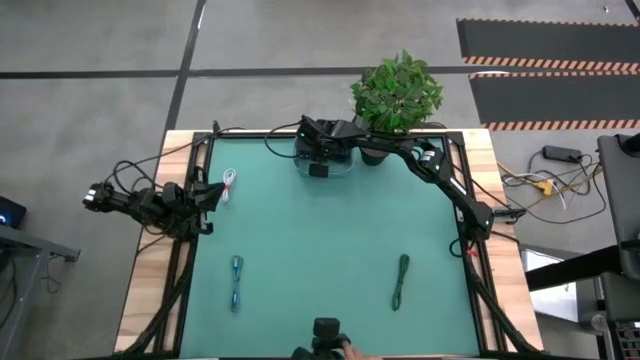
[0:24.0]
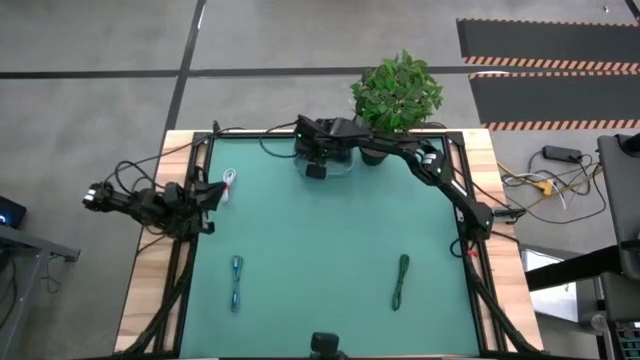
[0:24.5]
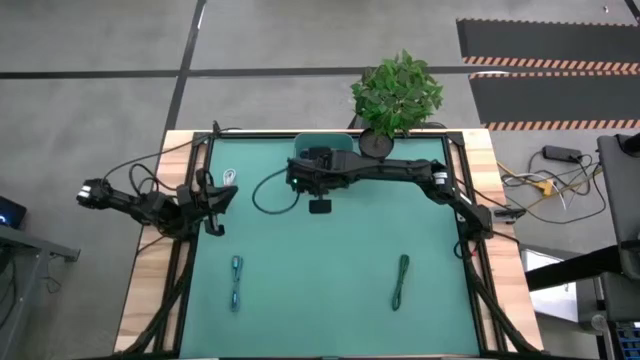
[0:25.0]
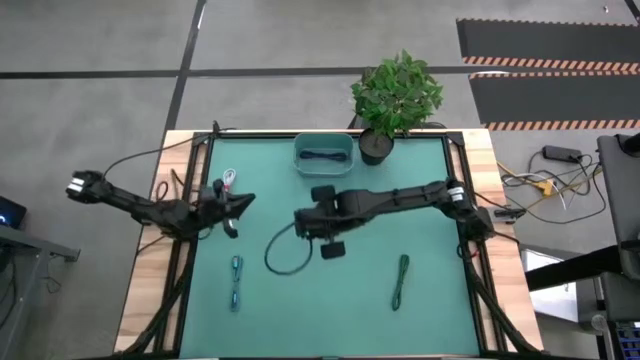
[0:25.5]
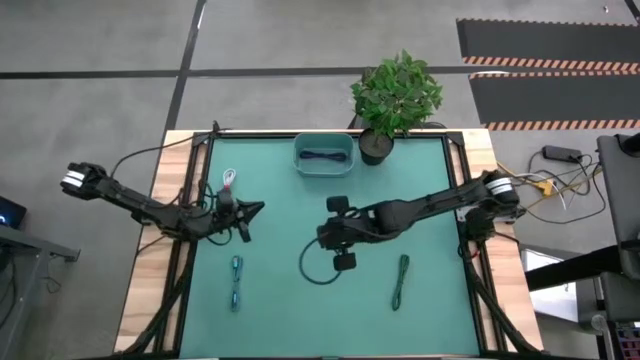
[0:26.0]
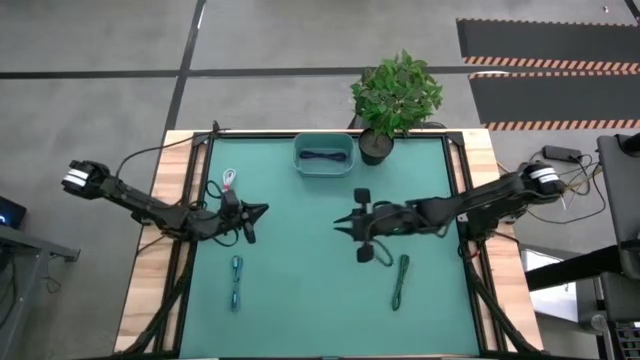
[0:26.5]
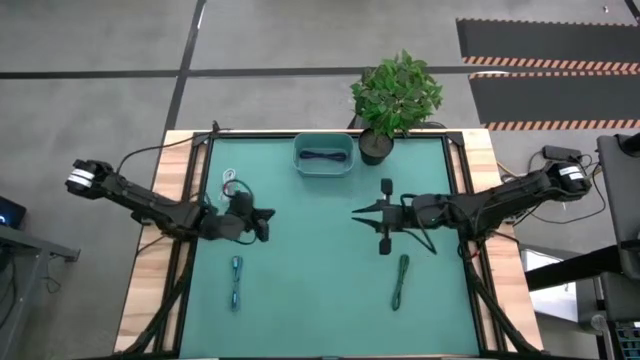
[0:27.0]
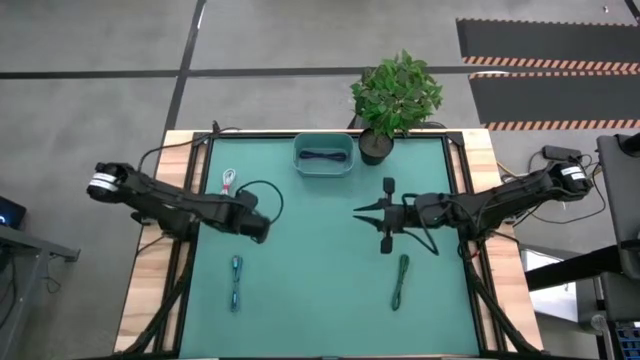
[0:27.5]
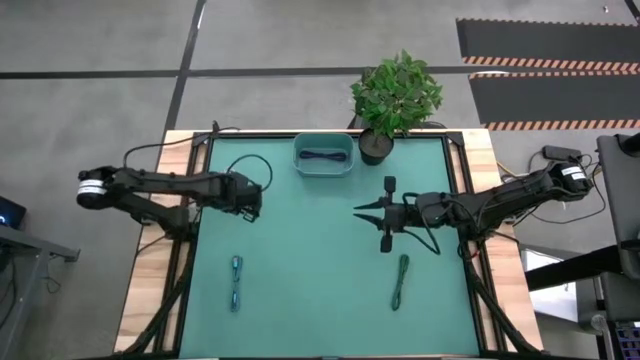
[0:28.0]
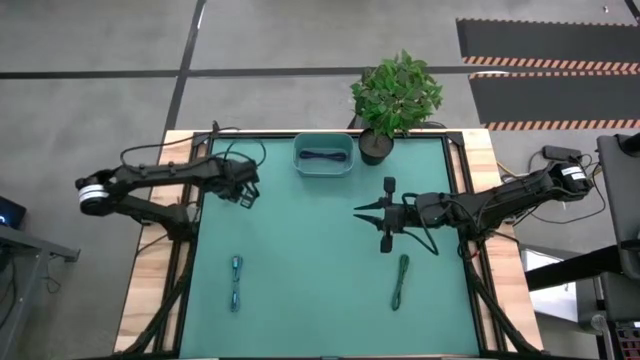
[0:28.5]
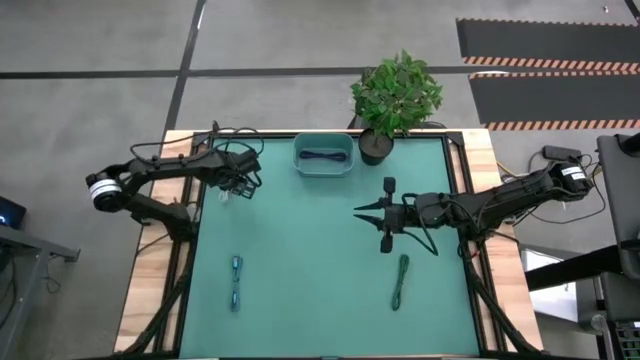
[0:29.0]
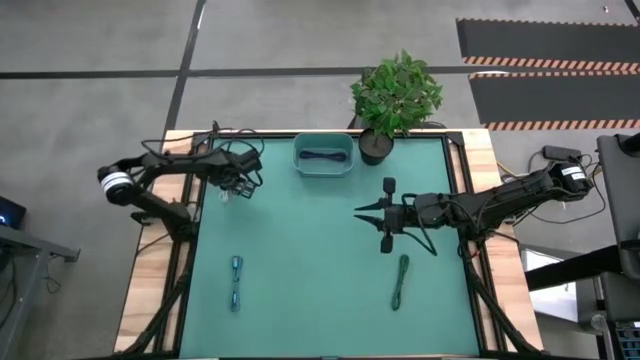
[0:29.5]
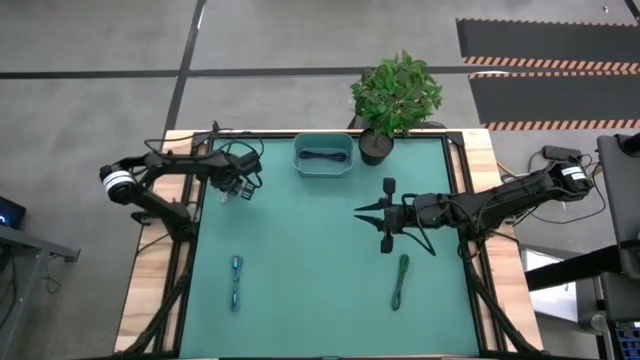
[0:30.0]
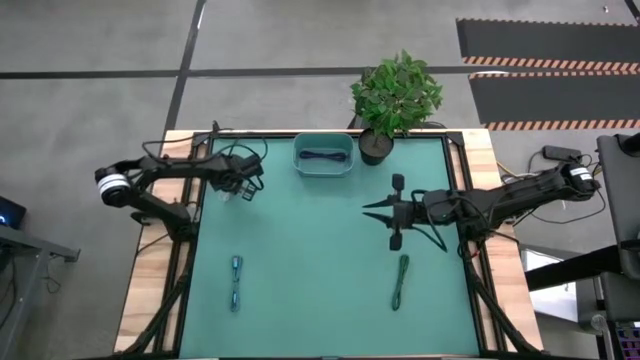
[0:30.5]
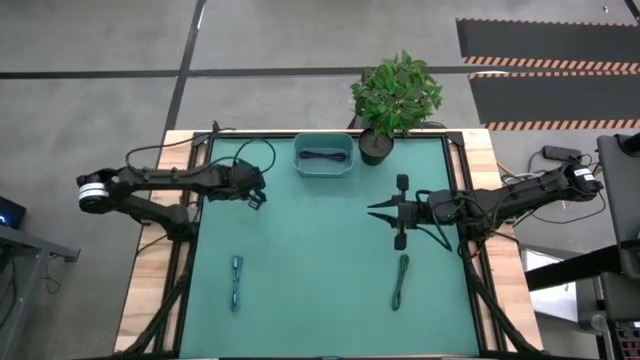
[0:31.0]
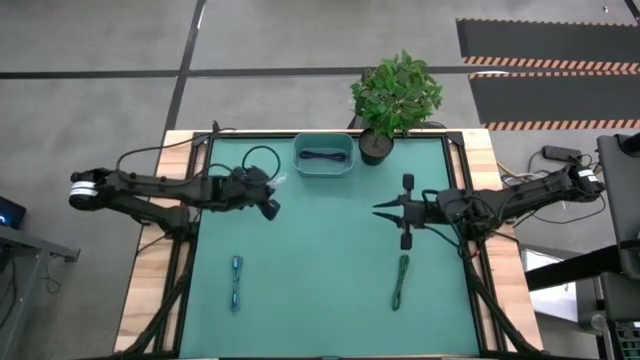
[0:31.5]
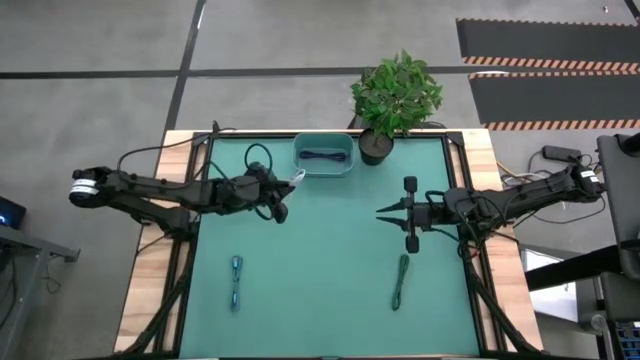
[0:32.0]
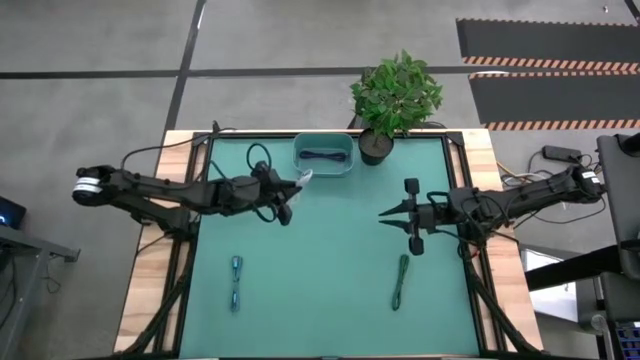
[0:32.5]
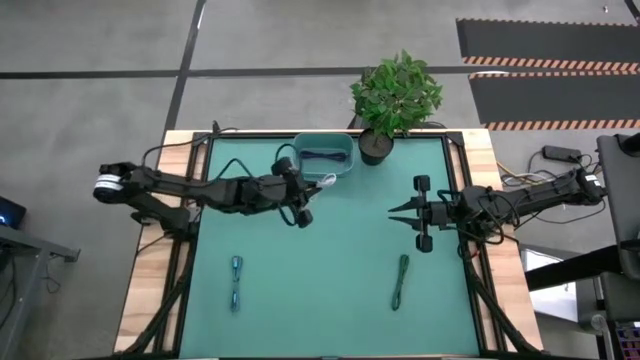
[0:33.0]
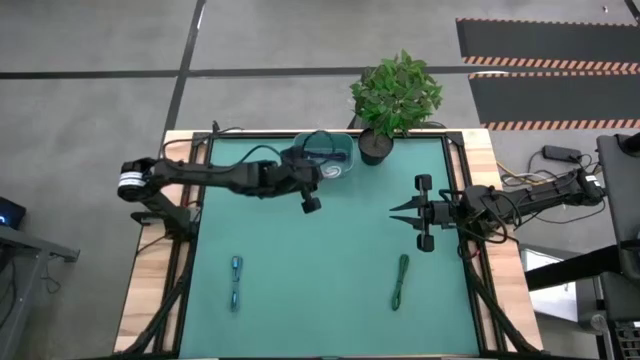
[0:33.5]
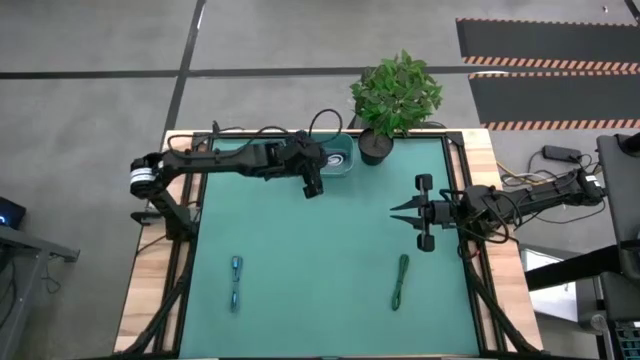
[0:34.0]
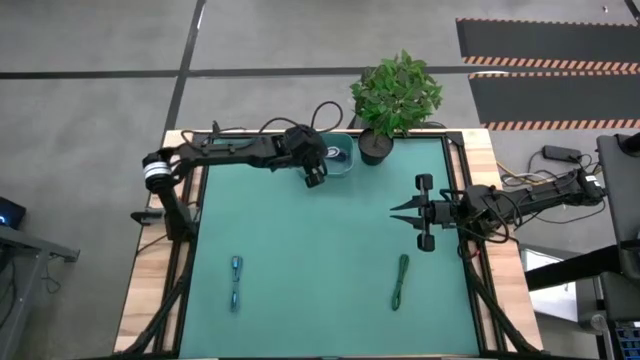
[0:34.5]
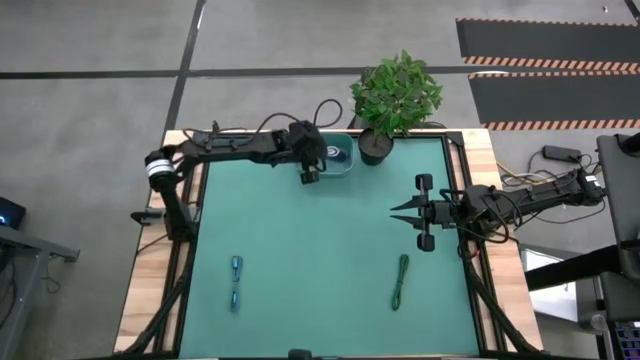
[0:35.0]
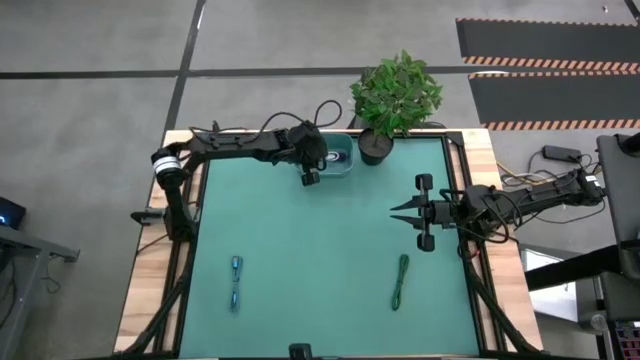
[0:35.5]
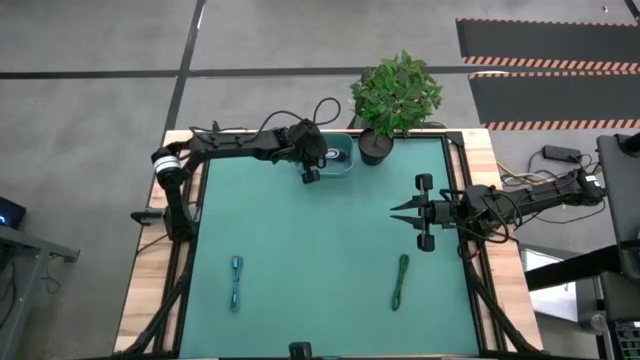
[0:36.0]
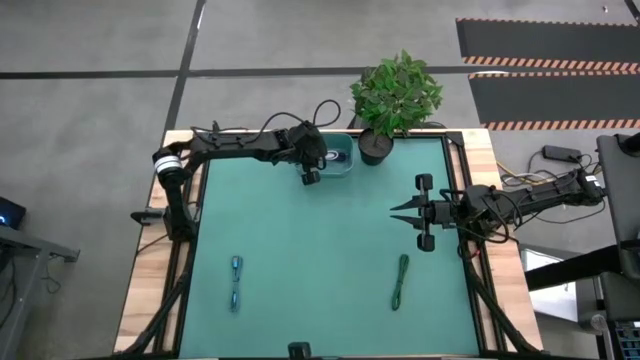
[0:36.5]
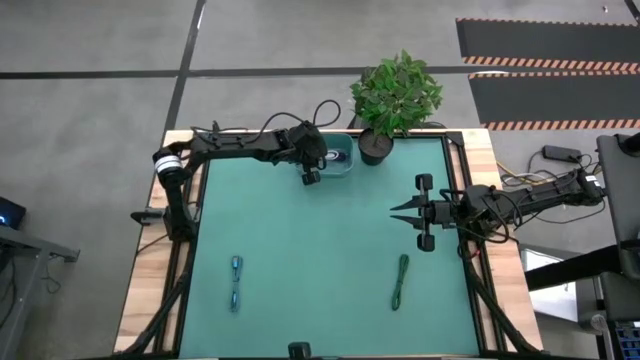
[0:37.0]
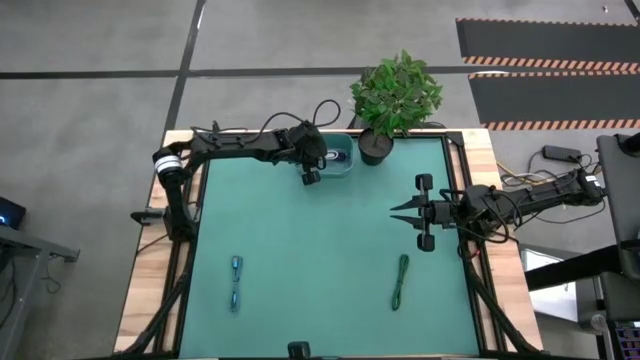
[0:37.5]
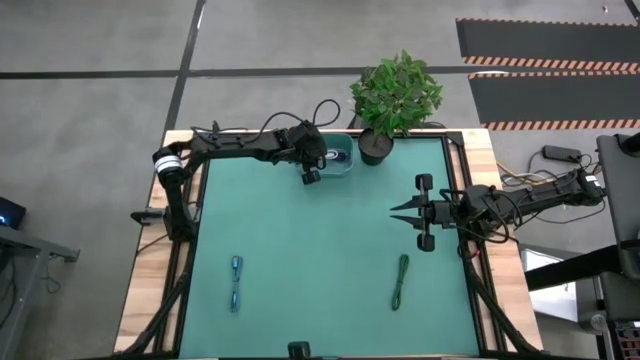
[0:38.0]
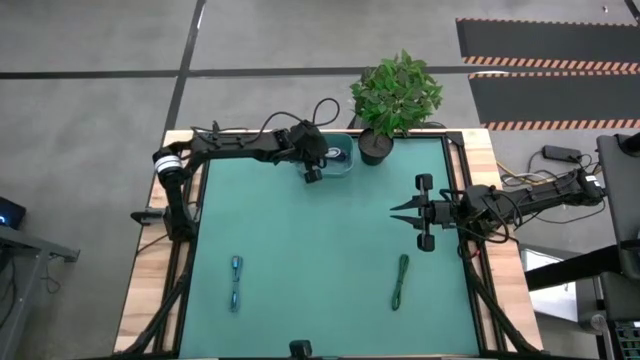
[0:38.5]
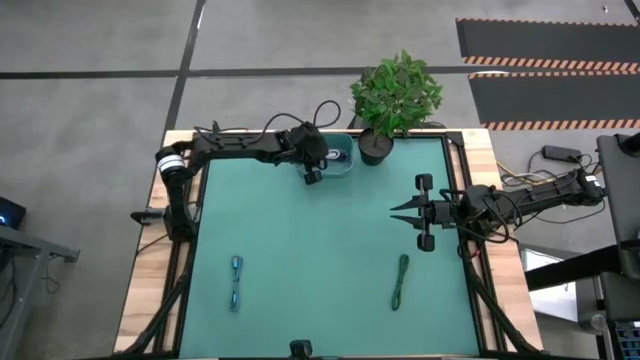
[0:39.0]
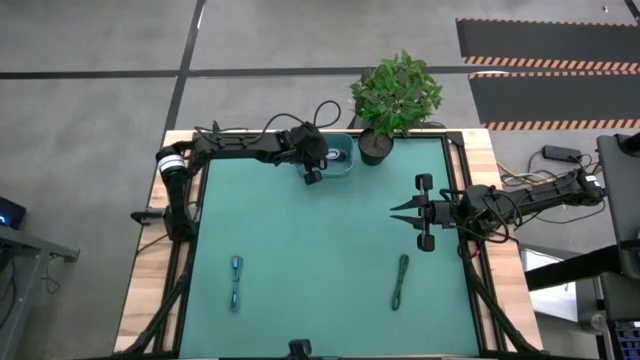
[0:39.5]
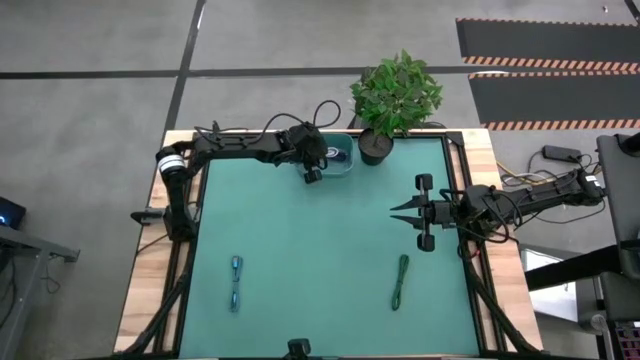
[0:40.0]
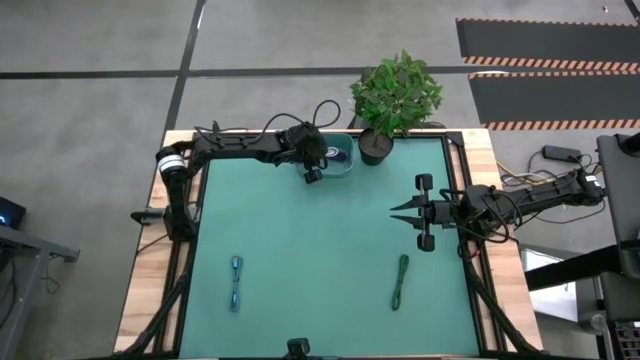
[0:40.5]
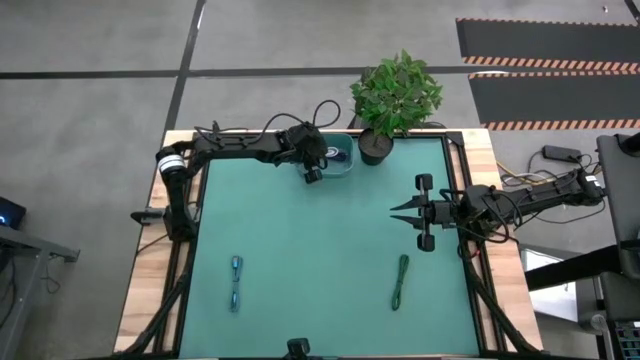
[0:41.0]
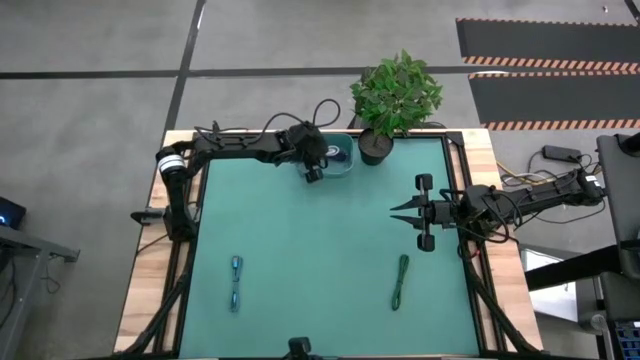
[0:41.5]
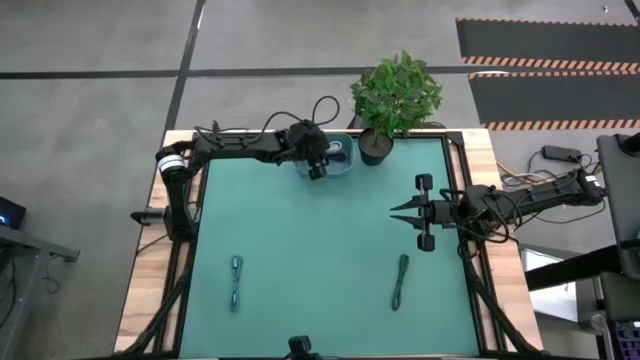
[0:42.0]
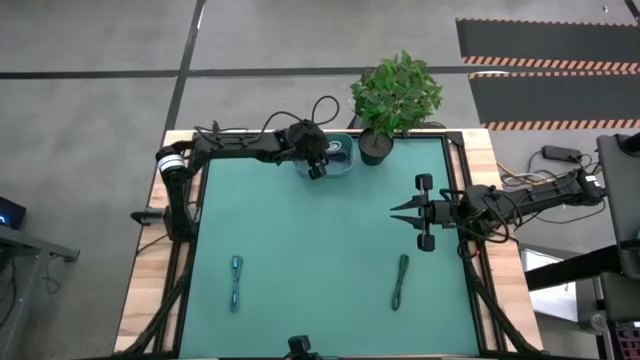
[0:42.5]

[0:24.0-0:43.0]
Task: Pick and place USB-C Cables
Put the white charger cable into the green bin
